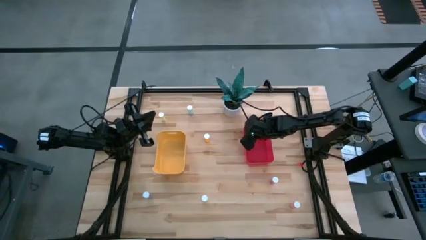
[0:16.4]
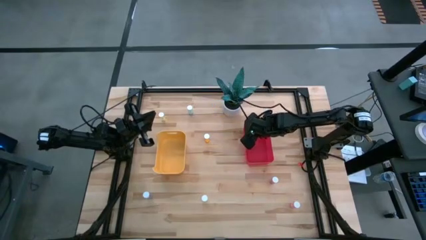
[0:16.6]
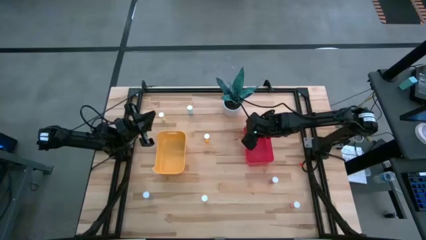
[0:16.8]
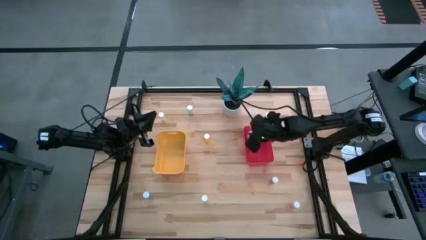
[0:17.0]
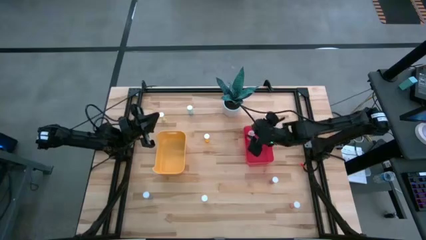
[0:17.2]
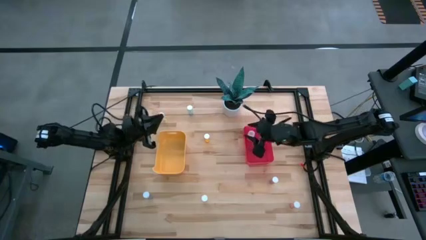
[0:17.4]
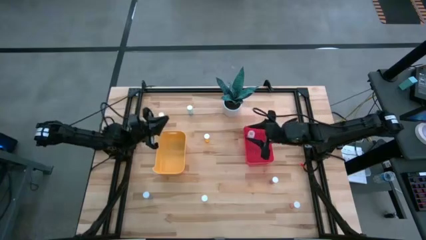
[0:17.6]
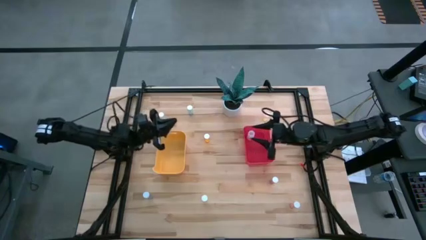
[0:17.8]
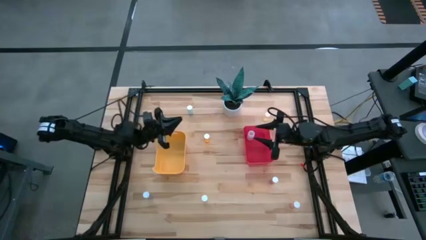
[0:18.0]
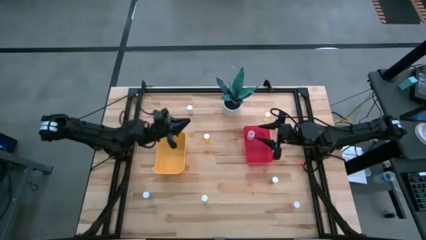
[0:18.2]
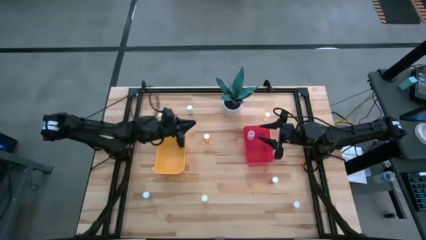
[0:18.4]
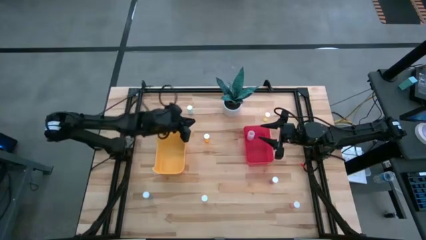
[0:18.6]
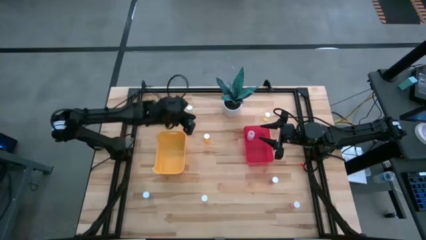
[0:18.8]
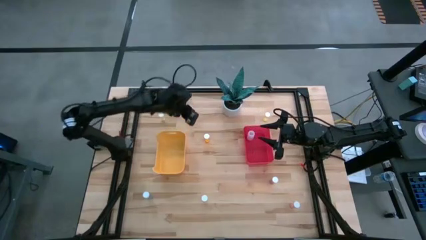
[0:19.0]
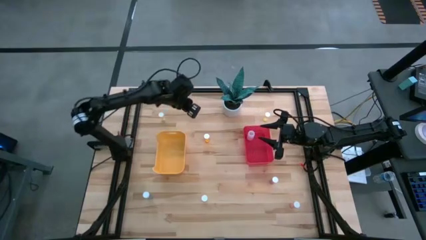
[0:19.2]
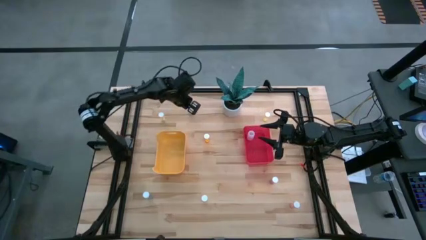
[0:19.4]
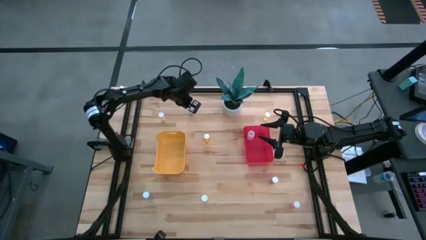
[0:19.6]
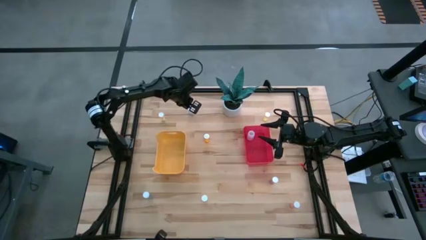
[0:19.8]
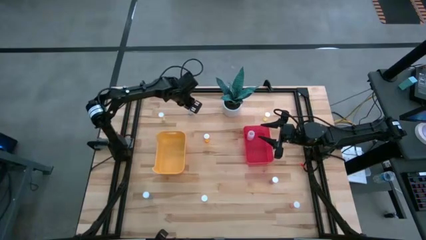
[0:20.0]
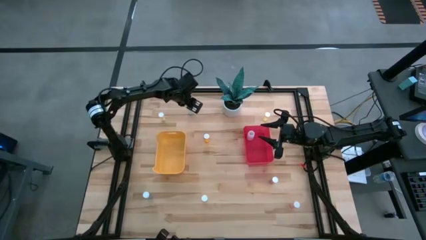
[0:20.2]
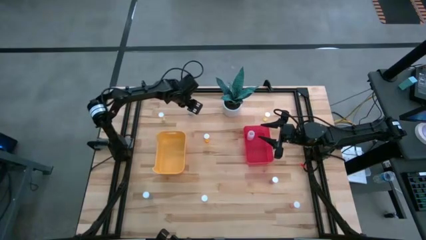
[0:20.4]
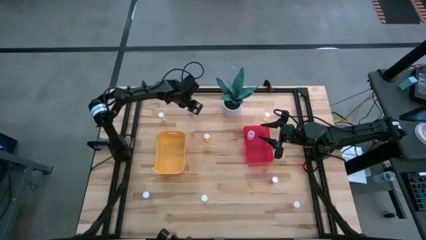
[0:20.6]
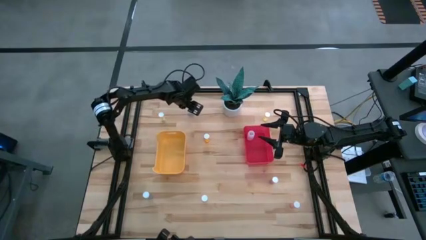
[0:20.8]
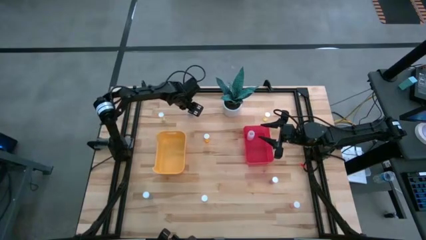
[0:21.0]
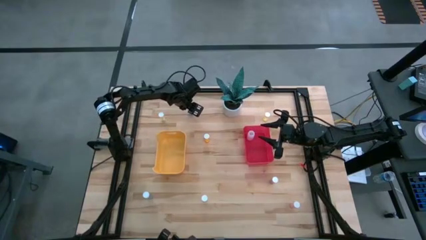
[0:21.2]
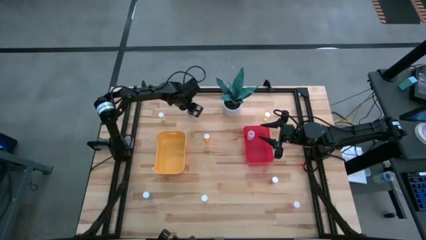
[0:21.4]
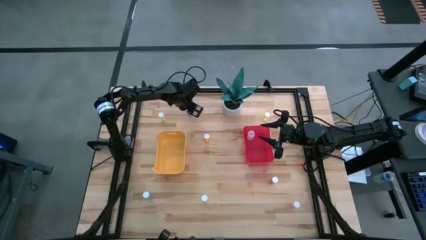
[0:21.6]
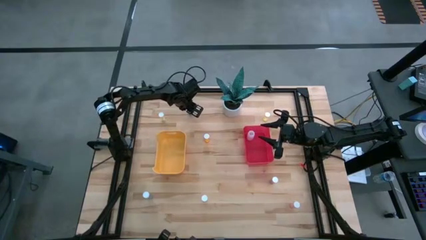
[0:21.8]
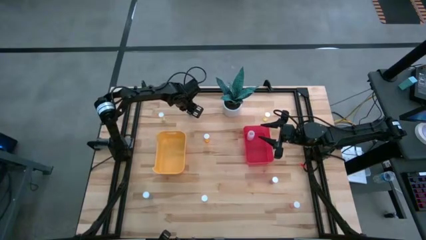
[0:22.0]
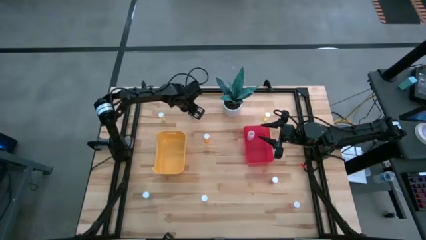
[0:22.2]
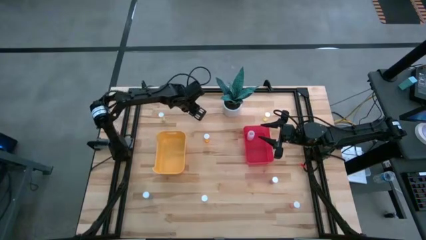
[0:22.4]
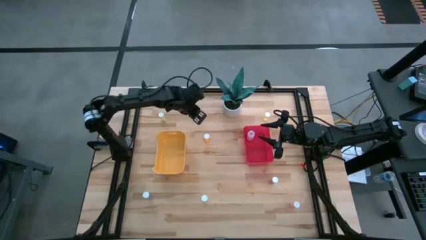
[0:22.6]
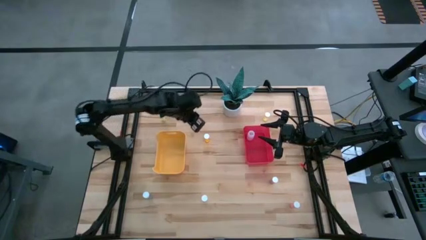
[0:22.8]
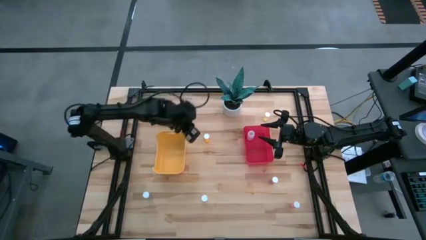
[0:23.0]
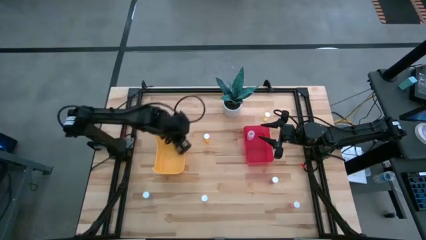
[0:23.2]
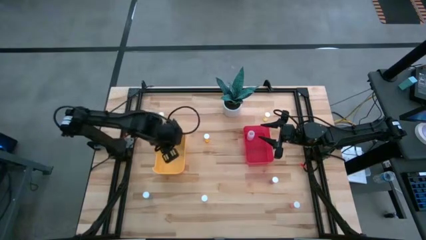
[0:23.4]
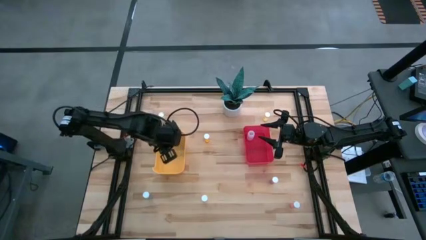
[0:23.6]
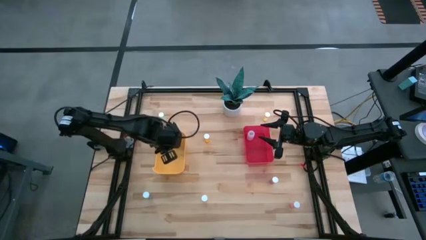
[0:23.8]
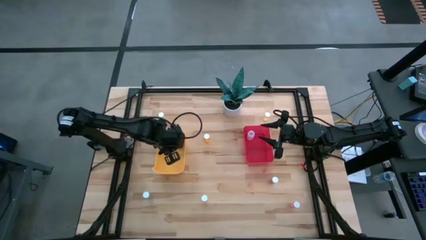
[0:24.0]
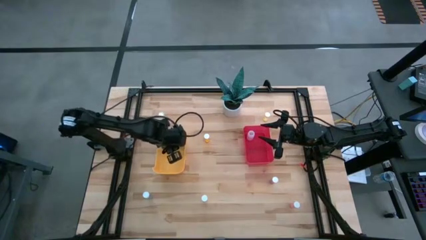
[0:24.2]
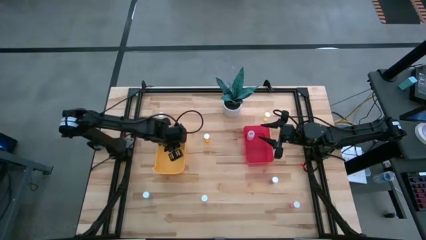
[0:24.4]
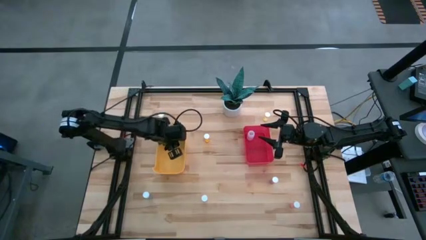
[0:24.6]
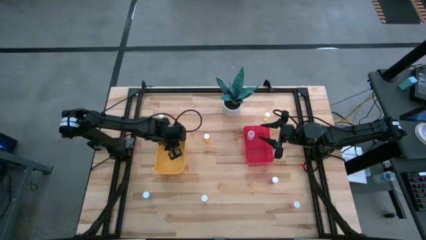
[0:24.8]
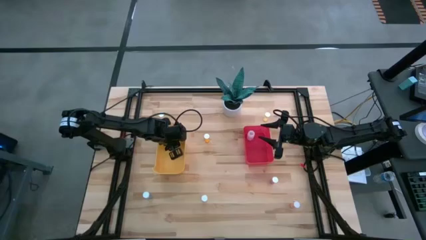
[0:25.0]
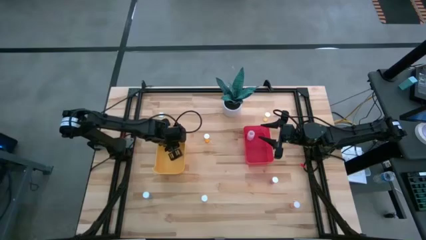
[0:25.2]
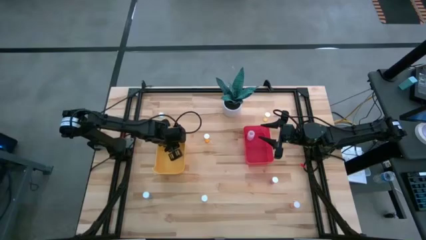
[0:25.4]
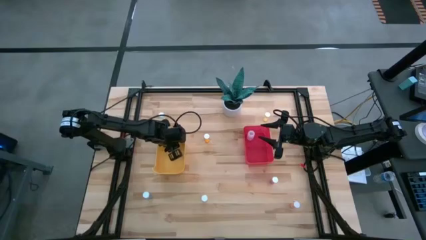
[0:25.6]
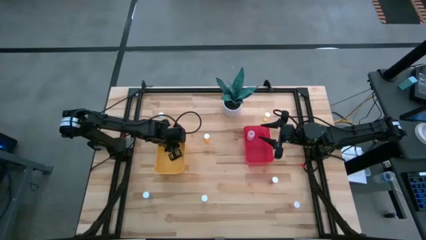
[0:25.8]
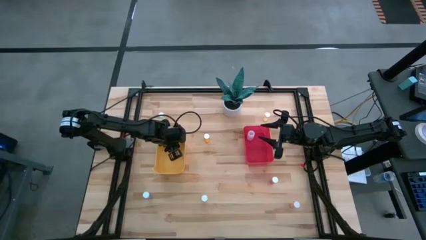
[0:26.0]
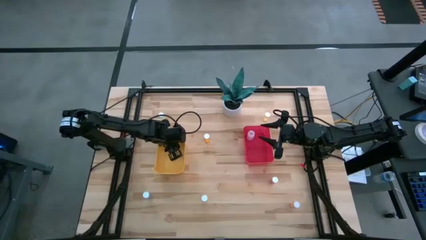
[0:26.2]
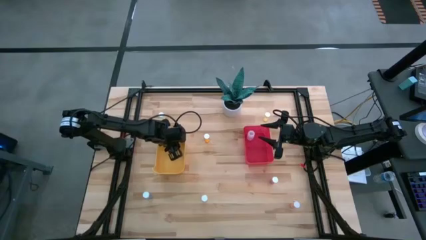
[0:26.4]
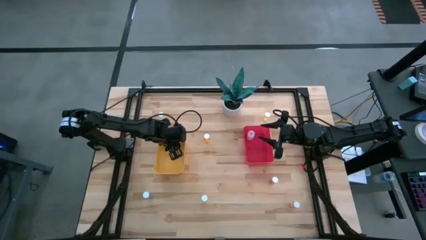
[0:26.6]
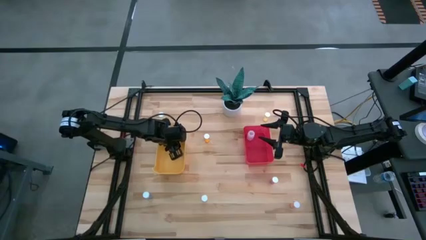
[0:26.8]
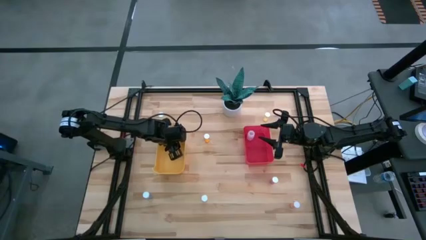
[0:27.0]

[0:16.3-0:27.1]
Task: Pick and place medicine bottles into bin by pill shape (circle, oval)
Put the top blue tablet bottle into the yellow bin

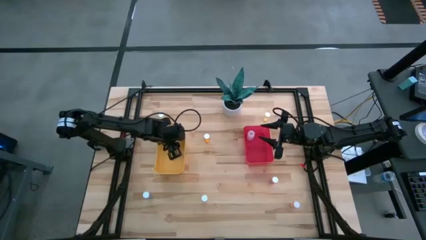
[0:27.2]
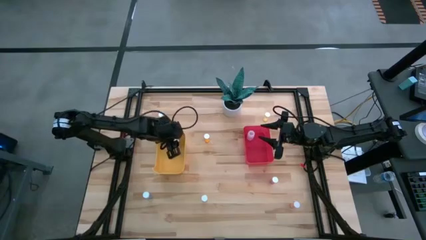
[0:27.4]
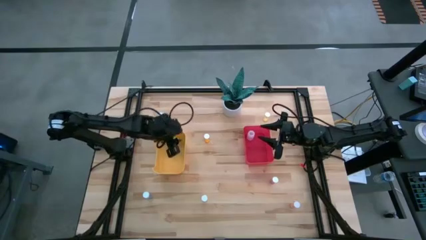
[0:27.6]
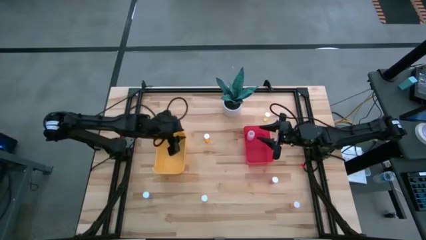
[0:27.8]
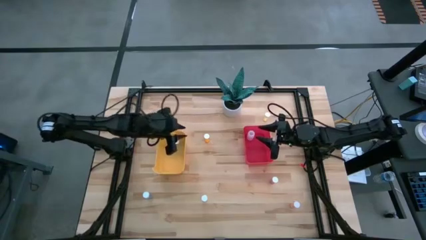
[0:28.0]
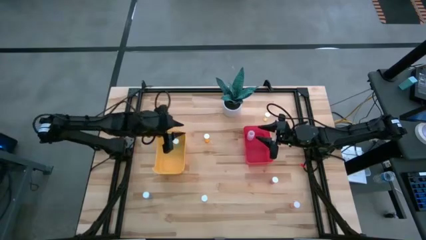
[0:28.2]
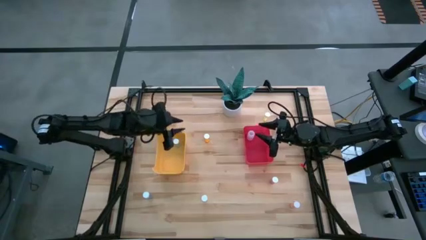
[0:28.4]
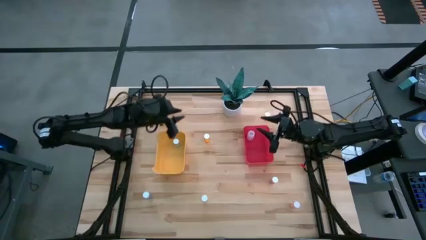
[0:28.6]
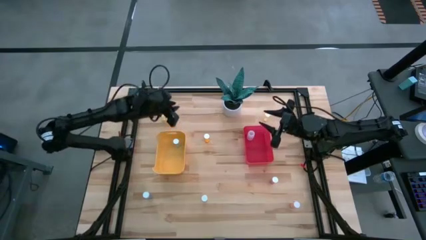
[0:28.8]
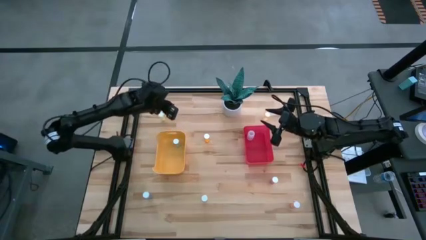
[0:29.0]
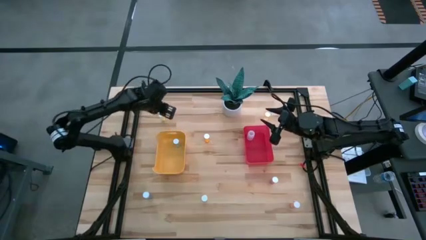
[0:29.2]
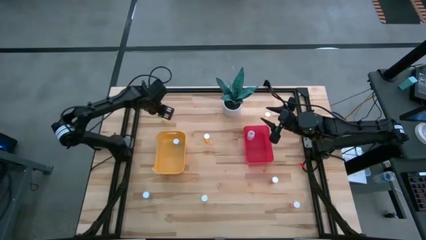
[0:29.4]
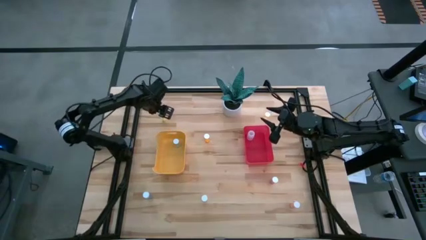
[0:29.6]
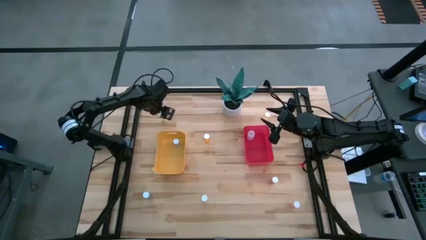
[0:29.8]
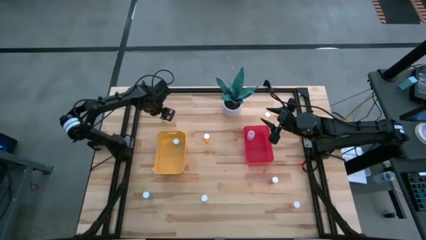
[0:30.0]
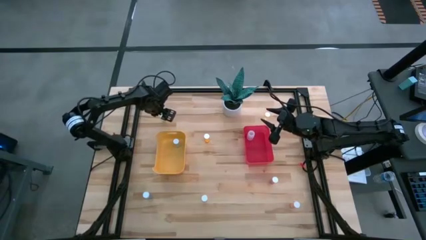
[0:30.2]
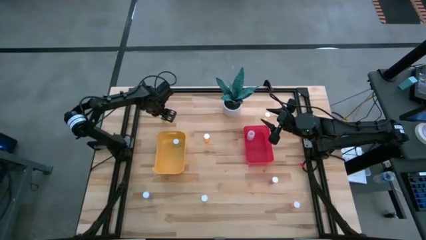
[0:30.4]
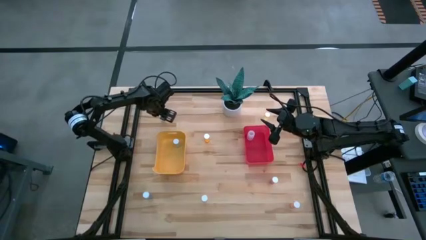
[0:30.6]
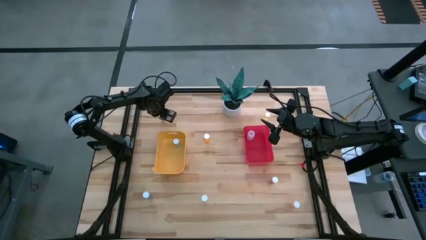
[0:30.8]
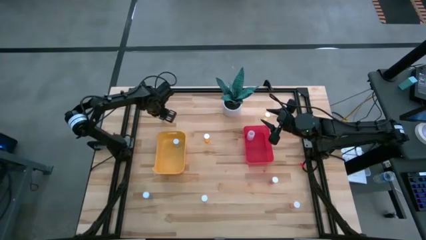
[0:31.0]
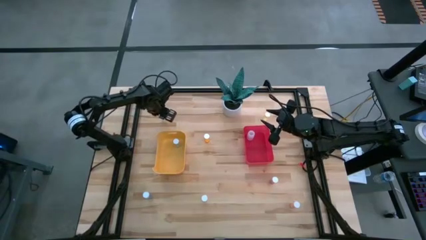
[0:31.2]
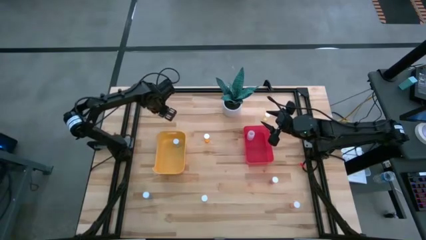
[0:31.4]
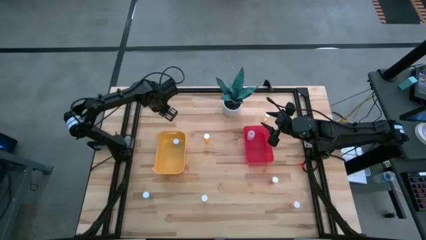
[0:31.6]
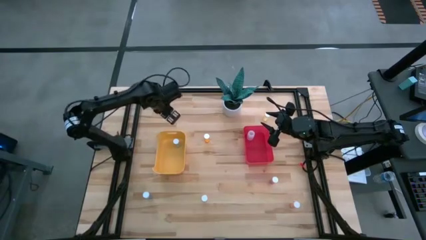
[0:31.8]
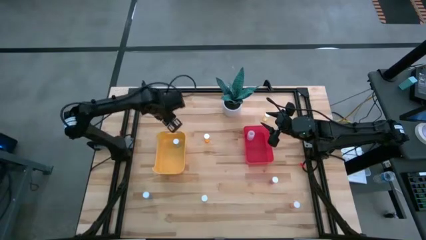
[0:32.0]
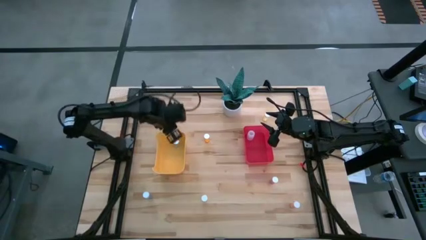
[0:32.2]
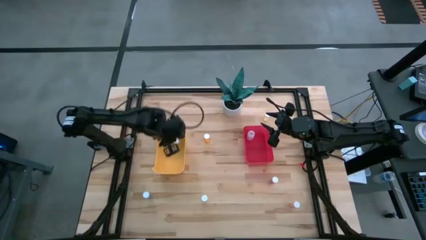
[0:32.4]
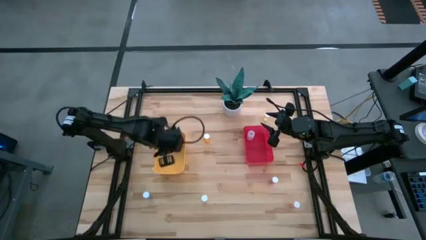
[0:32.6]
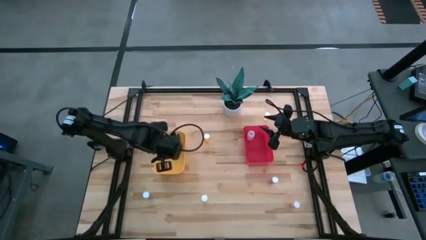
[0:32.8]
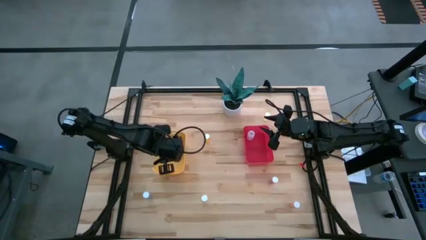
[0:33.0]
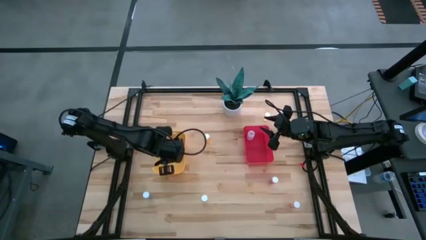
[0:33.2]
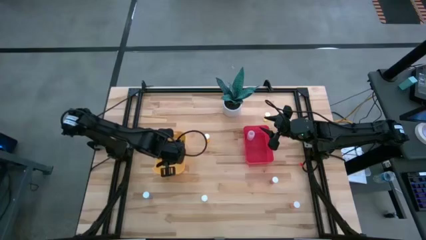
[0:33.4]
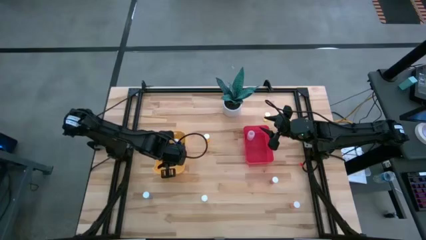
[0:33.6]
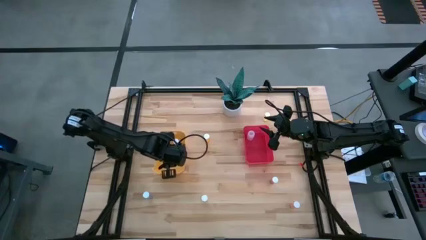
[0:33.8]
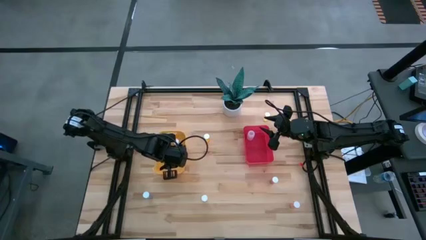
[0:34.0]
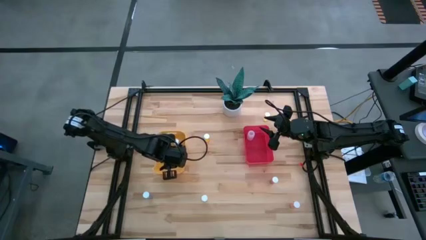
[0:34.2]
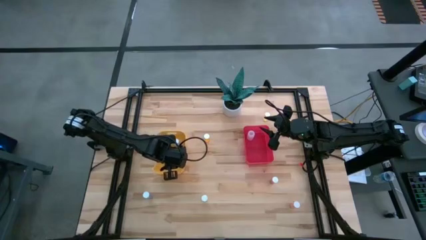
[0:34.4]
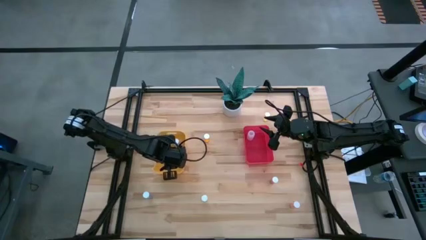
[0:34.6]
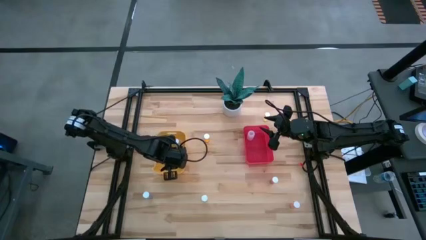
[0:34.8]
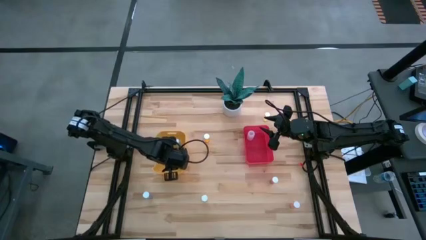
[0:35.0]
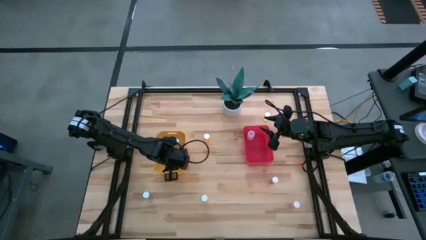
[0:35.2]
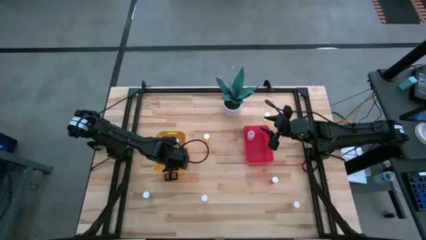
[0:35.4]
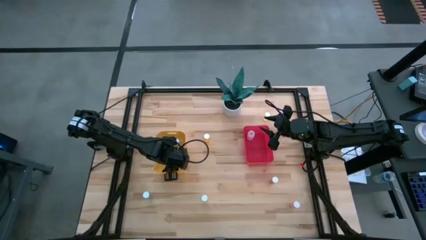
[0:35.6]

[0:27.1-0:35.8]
Put the top left yellow tablet bottle into the yellow bin
